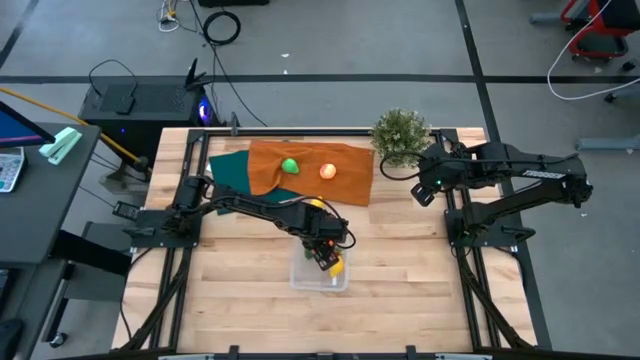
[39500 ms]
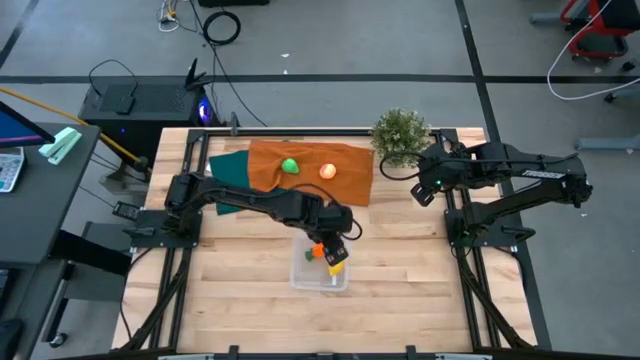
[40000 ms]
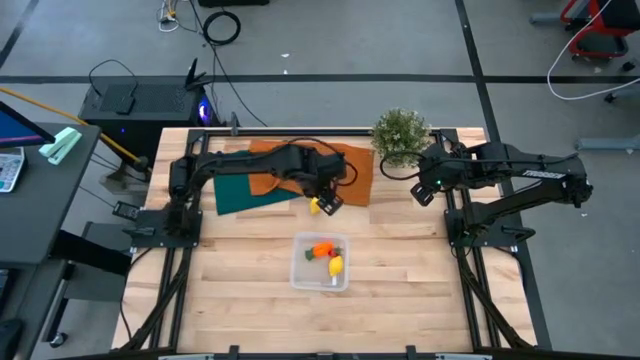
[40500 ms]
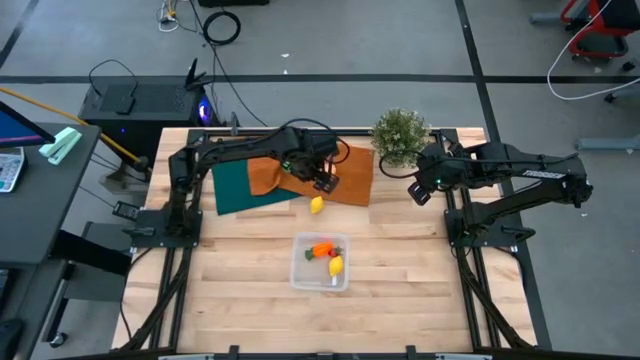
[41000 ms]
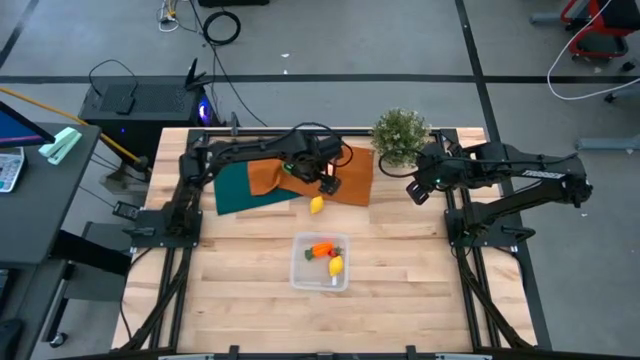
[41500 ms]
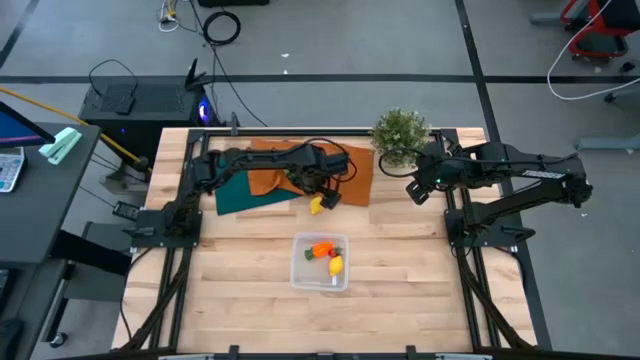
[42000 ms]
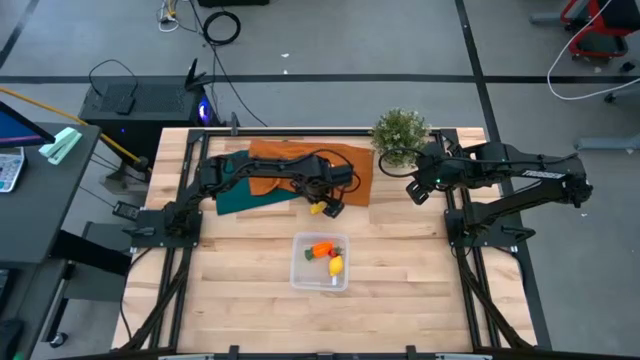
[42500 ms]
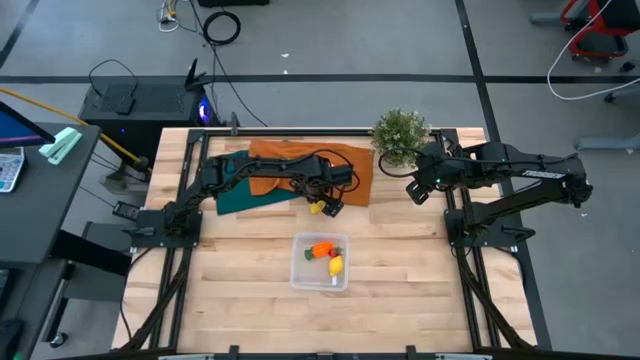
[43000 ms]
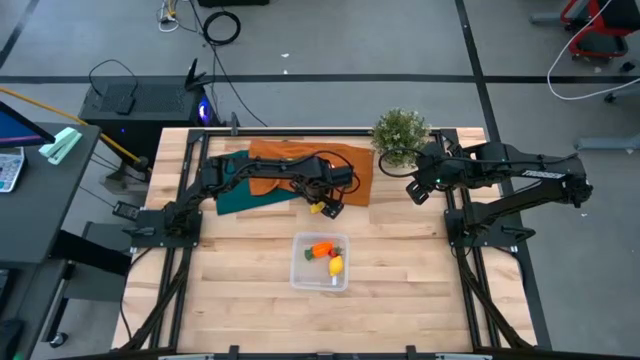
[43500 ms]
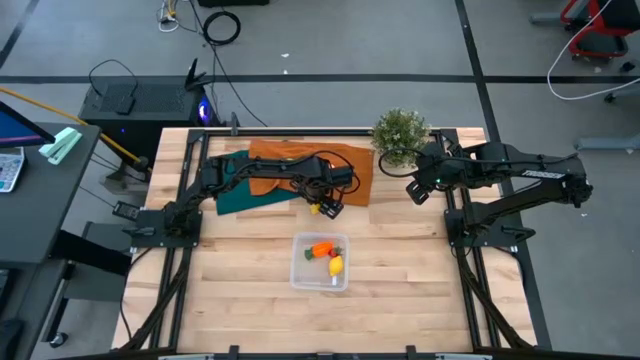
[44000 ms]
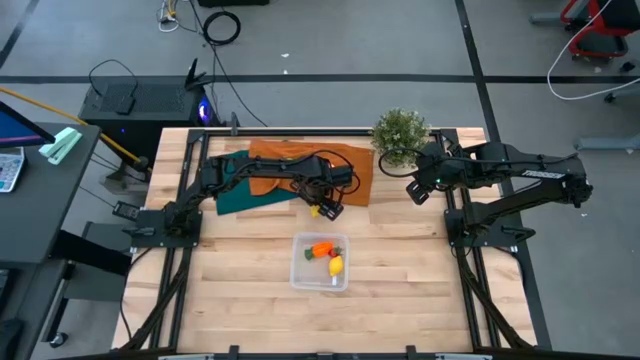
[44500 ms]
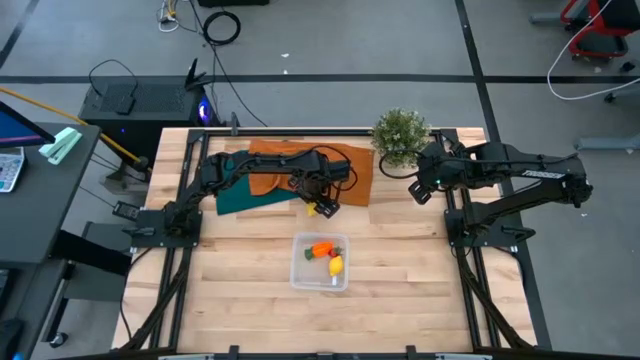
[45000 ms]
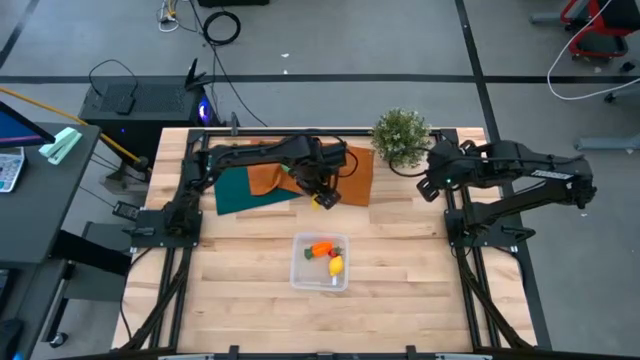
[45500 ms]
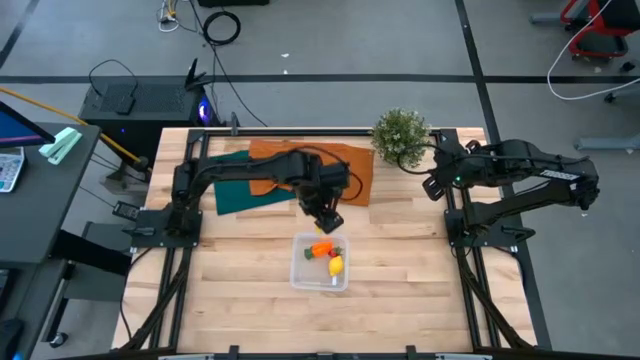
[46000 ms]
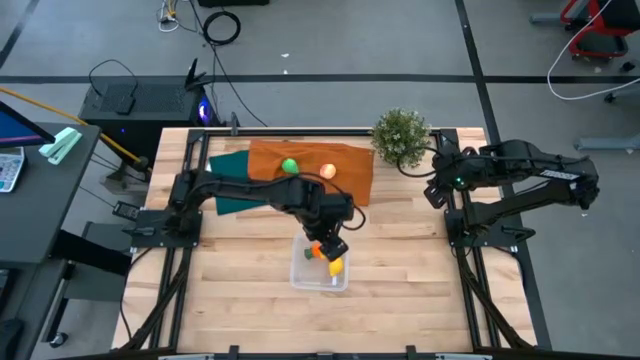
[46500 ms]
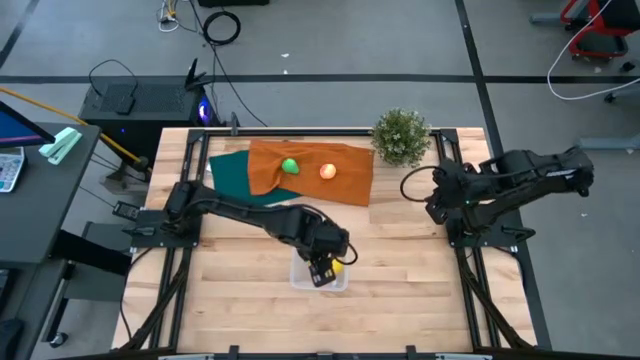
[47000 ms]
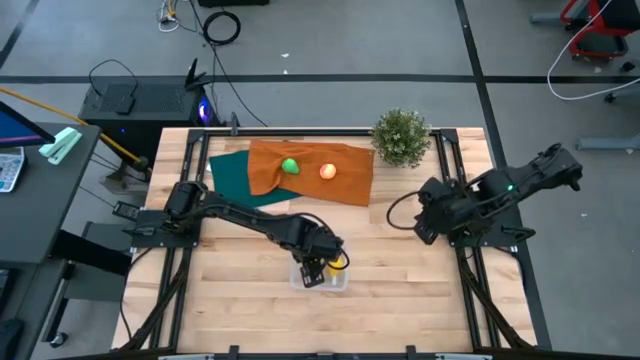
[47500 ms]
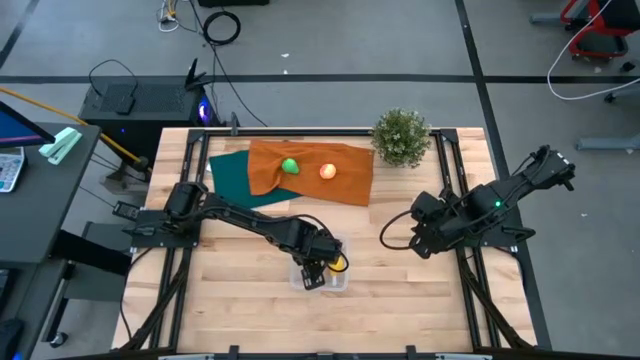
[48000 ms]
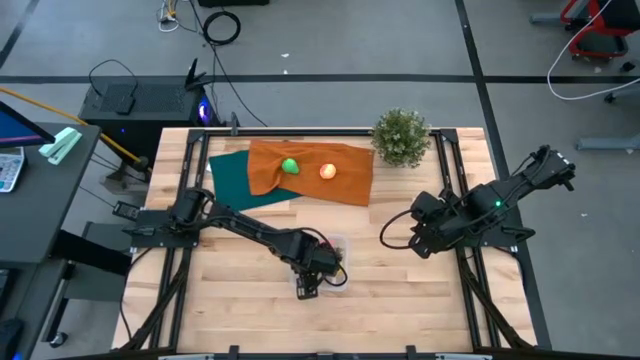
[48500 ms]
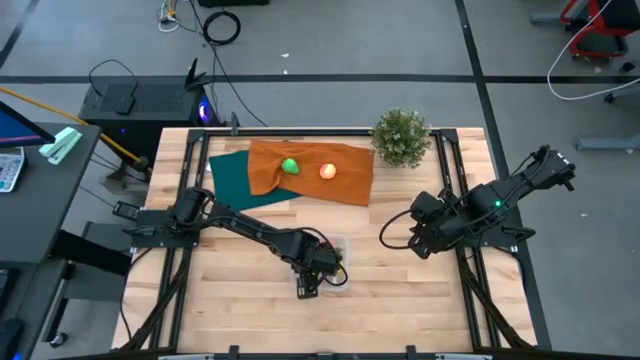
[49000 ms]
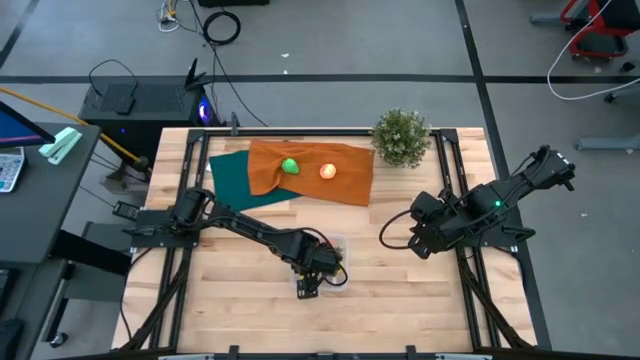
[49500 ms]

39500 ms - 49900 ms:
Task: Pick and placing Produce into tupperware
Put the yellow lemon into the transparent container

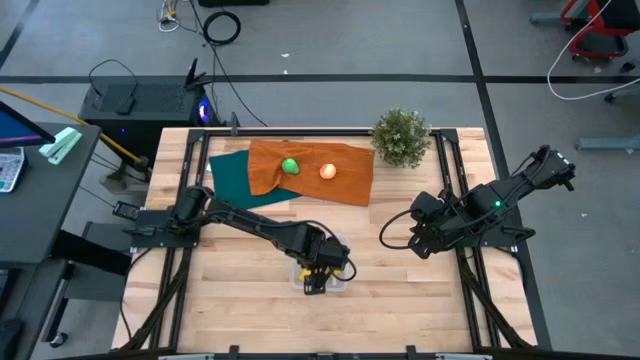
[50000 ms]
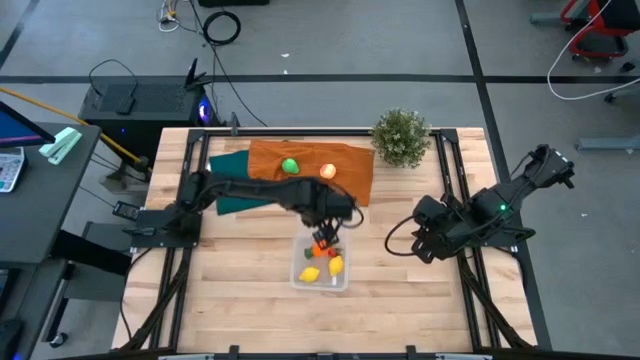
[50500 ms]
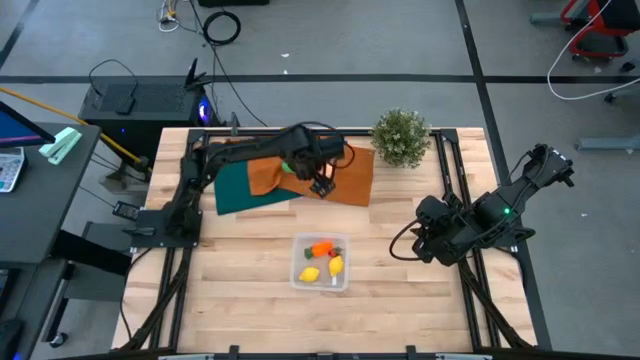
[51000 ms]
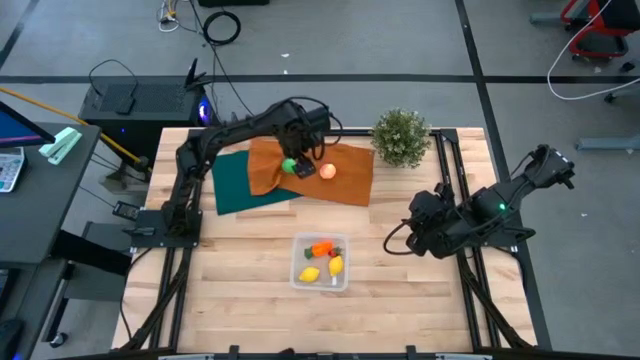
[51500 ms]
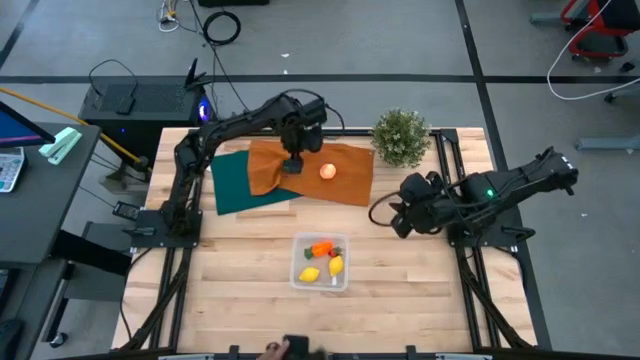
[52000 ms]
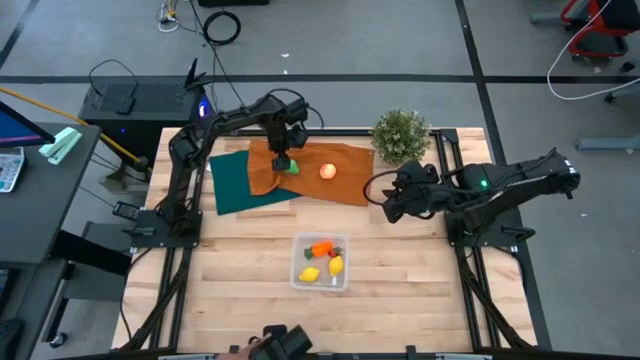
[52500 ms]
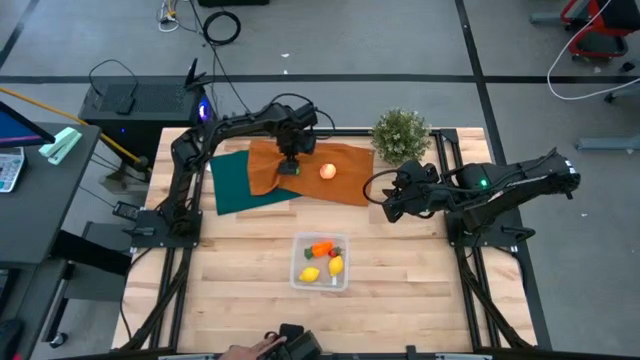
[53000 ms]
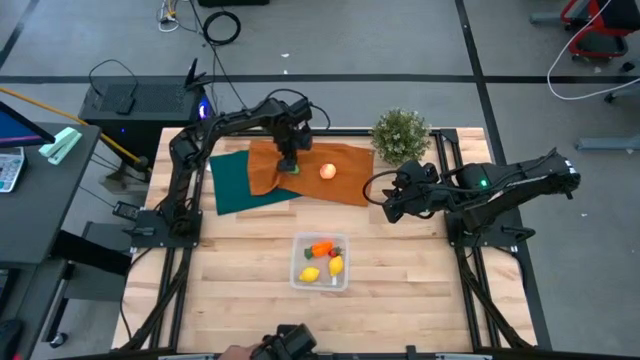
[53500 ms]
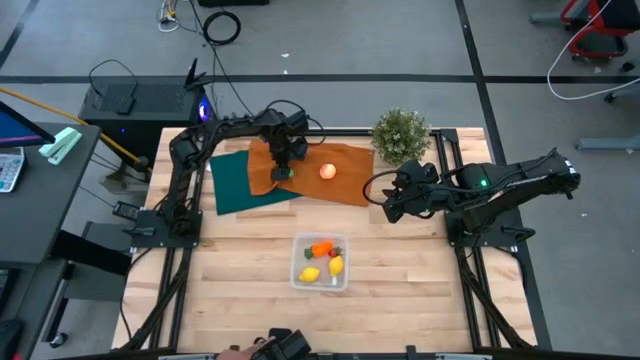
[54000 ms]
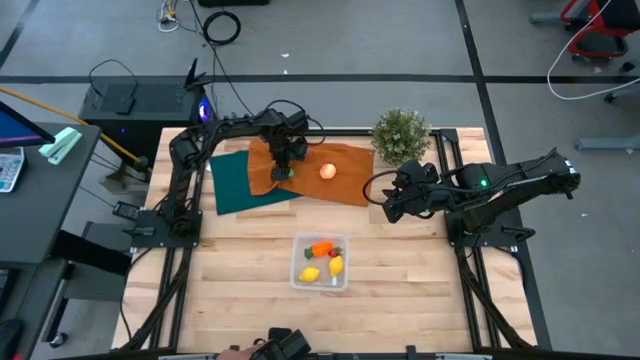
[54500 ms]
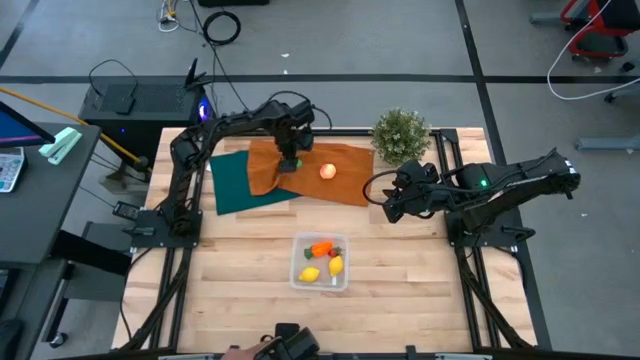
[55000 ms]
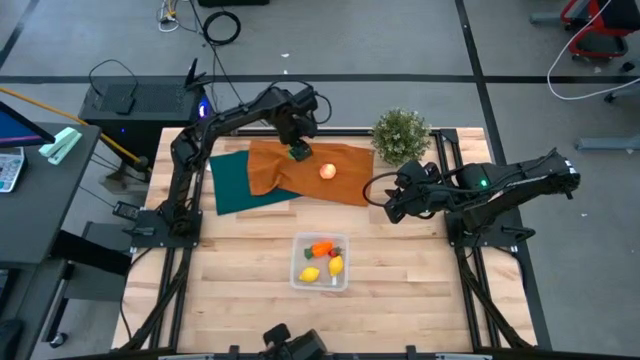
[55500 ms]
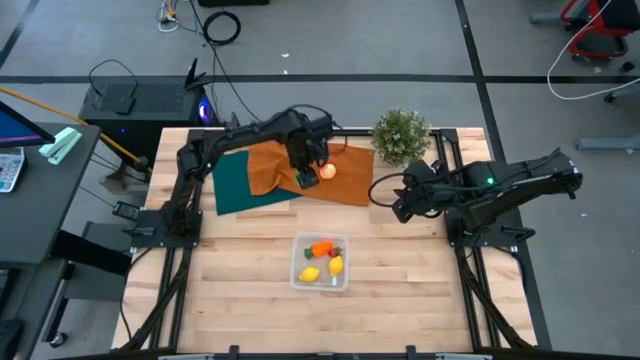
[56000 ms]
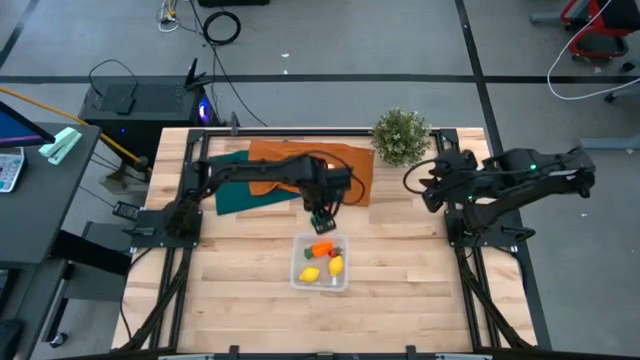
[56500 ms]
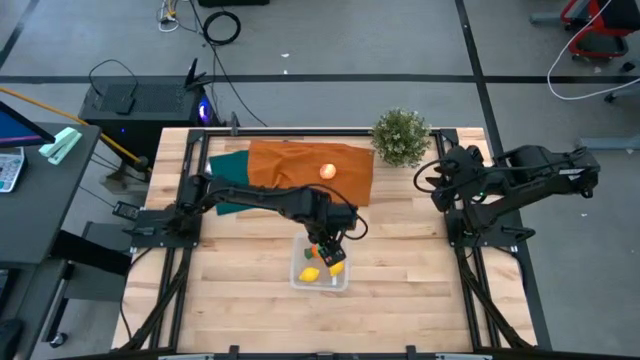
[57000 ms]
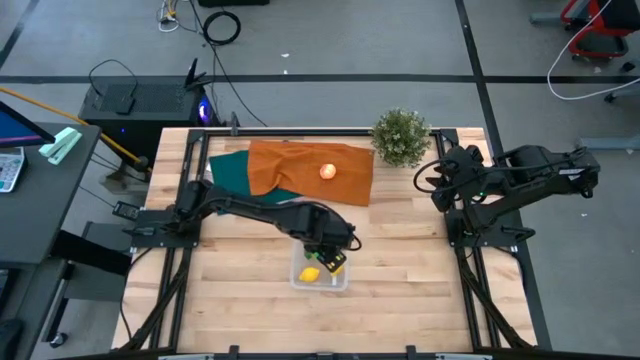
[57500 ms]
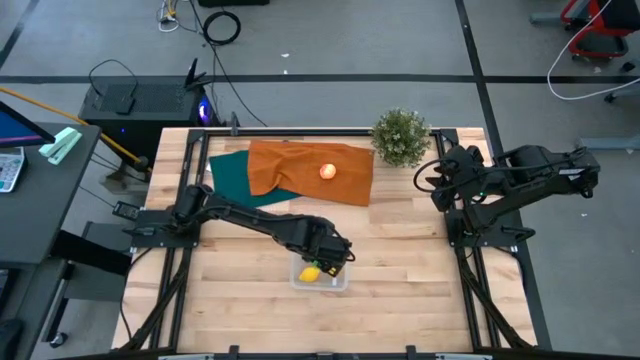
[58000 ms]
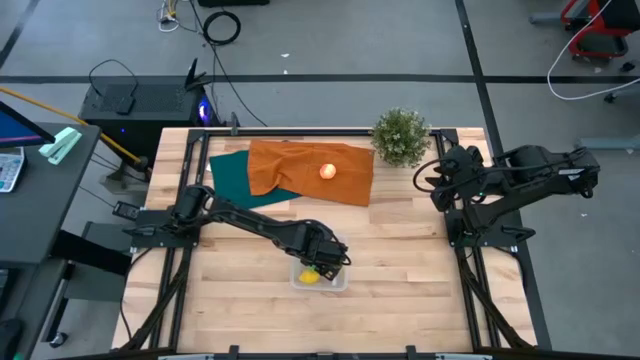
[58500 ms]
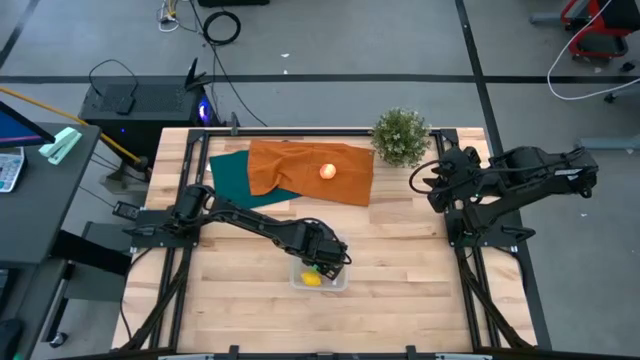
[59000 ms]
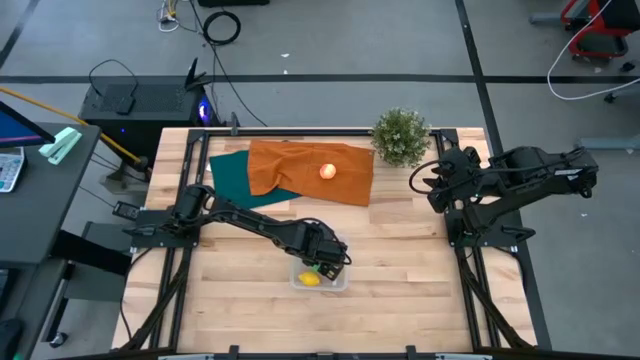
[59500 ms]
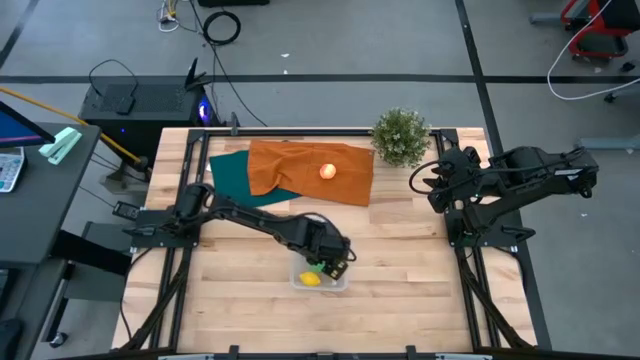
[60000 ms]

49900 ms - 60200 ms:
Put the green pear into the transparent container
